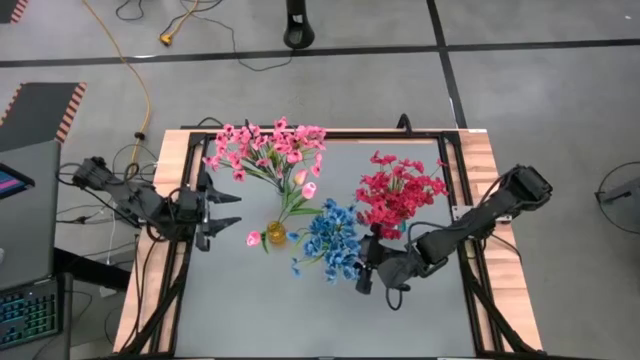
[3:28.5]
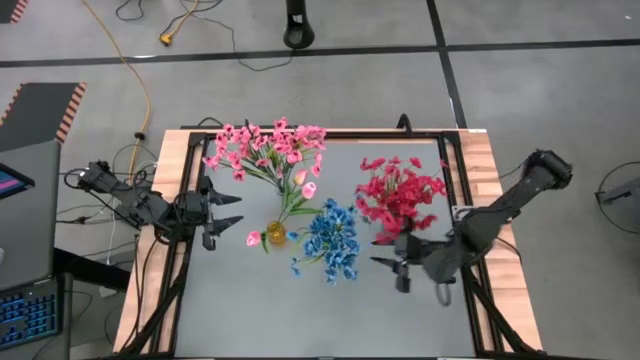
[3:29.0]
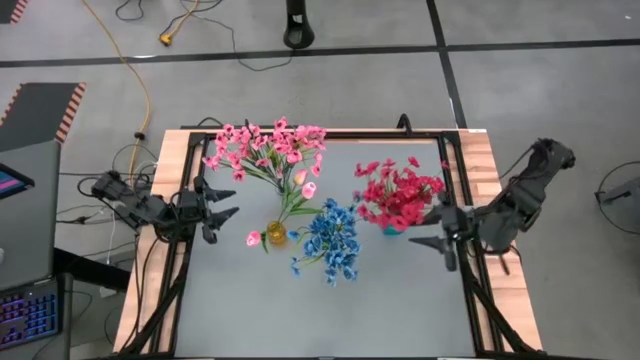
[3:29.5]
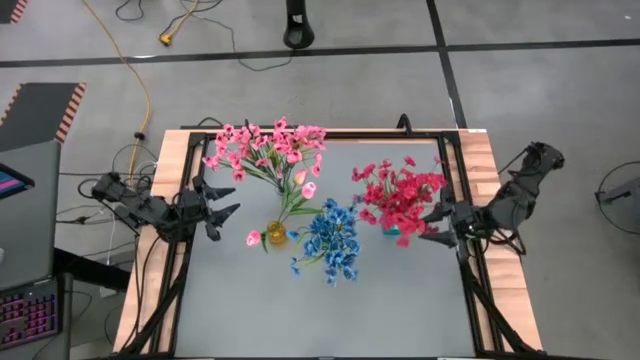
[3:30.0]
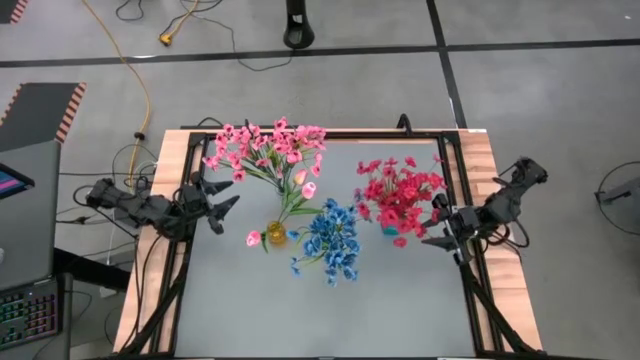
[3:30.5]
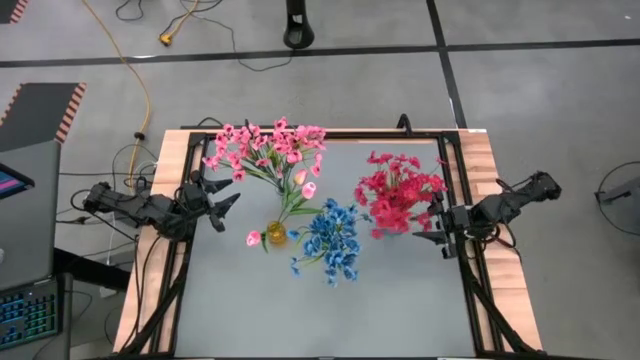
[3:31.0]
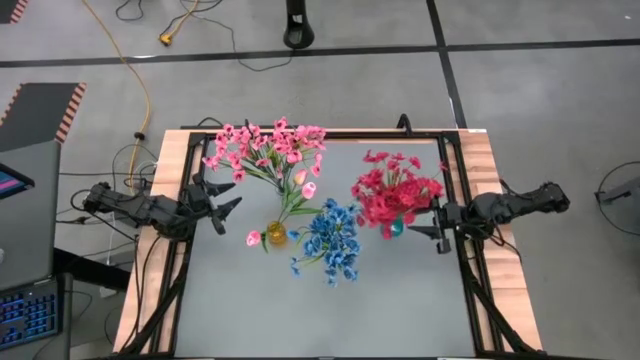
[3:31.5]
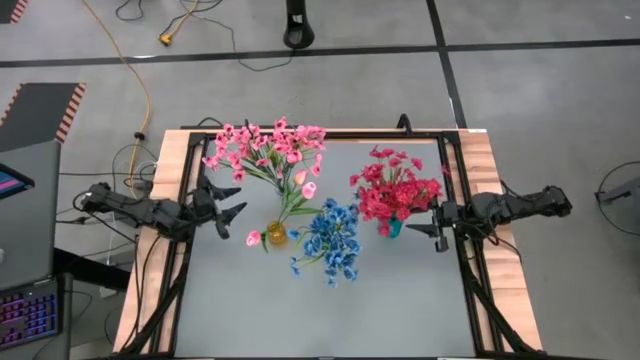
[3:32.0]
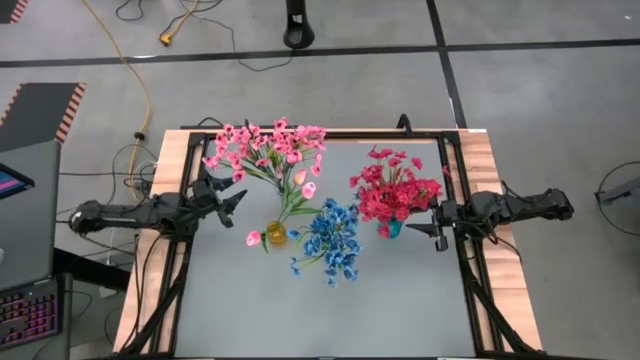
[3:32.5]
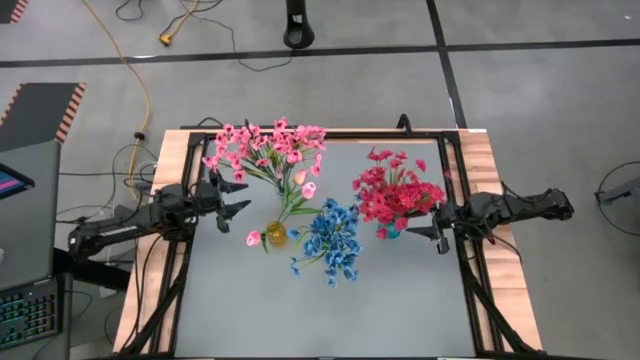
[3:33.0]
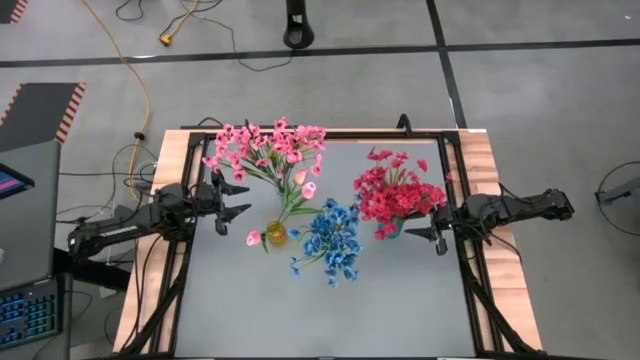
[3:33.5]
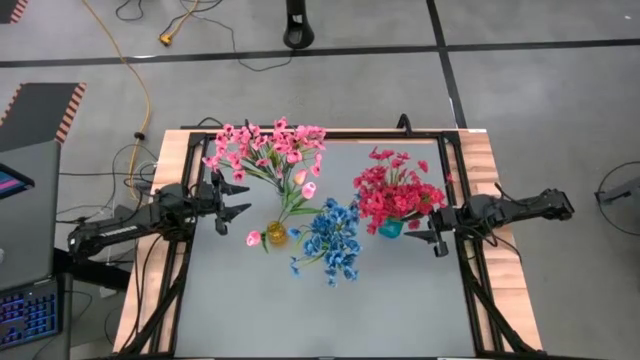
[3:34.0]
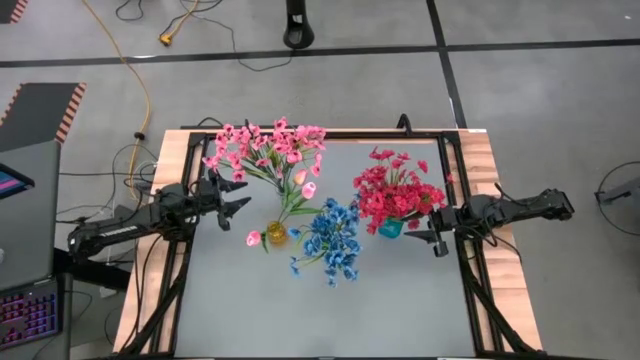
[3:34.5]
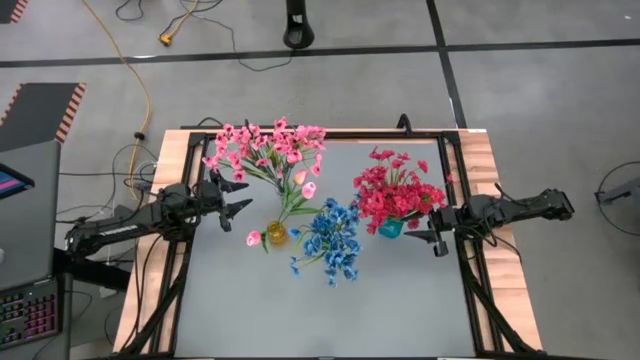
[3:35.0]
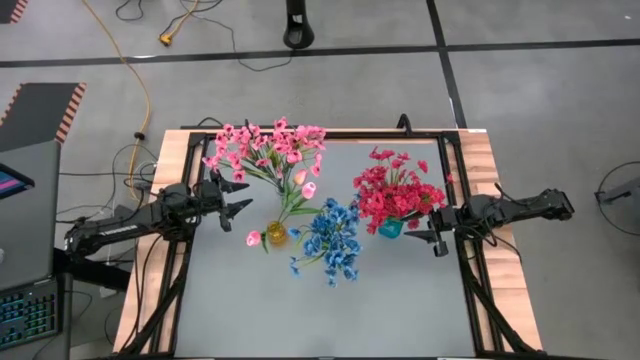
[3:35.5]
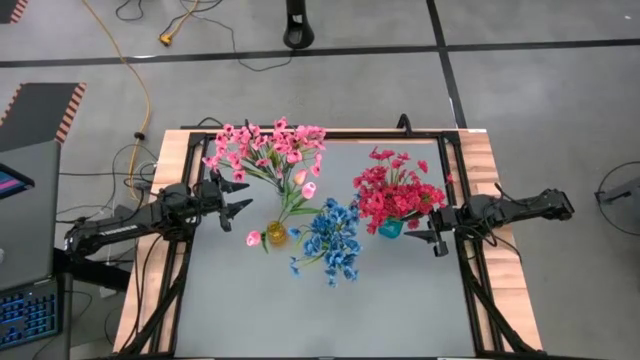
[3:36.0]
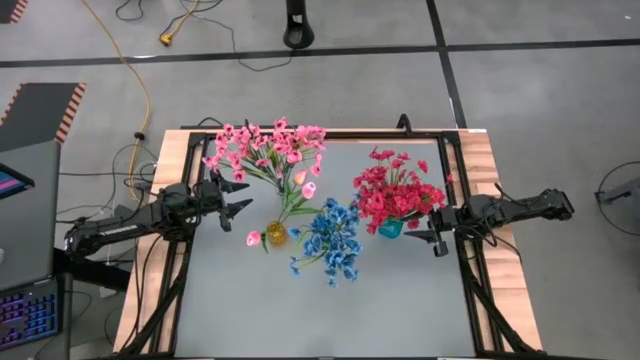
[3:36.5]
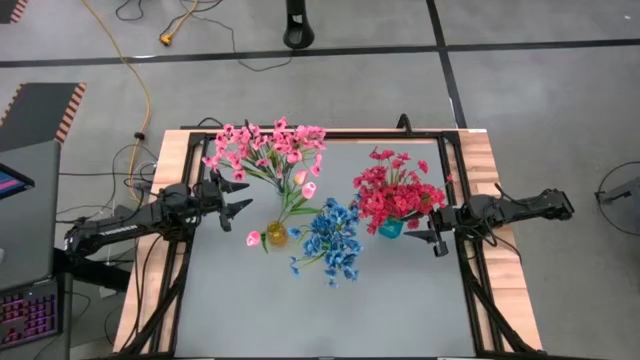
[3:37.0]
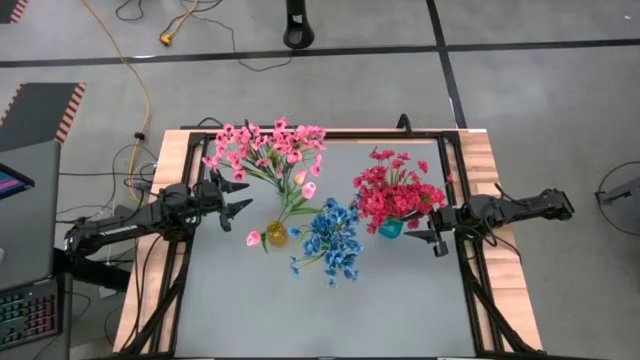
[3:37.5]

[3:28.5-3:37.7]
Task: Sort flowers into vase by color
Return to Home Position

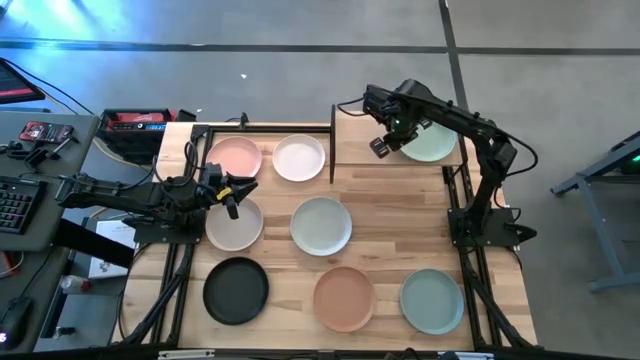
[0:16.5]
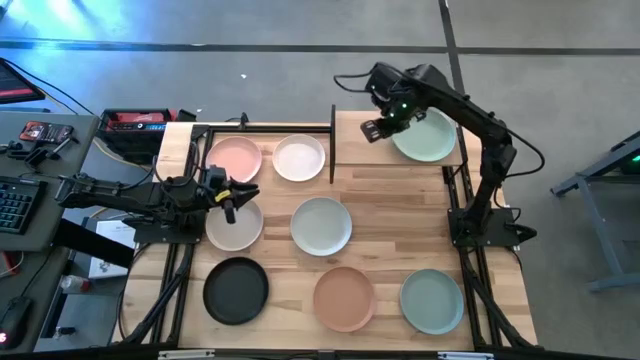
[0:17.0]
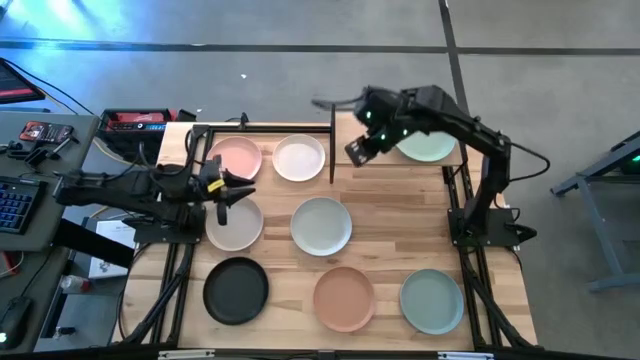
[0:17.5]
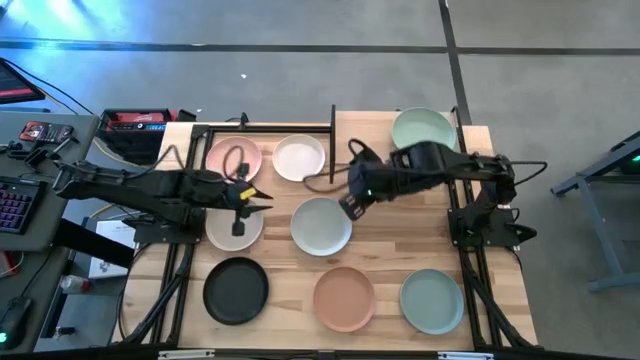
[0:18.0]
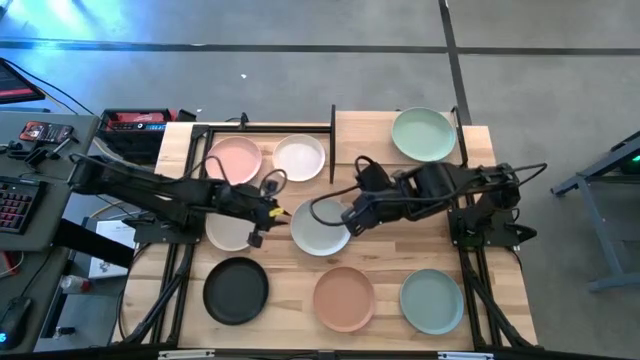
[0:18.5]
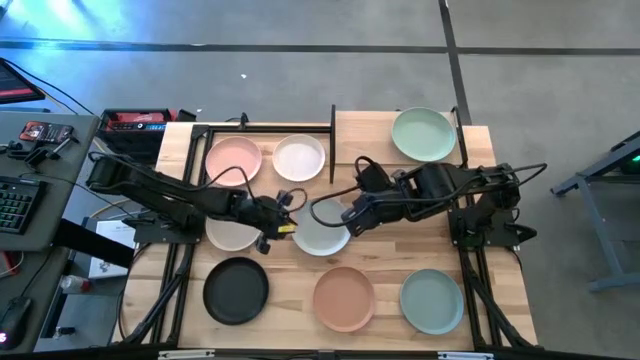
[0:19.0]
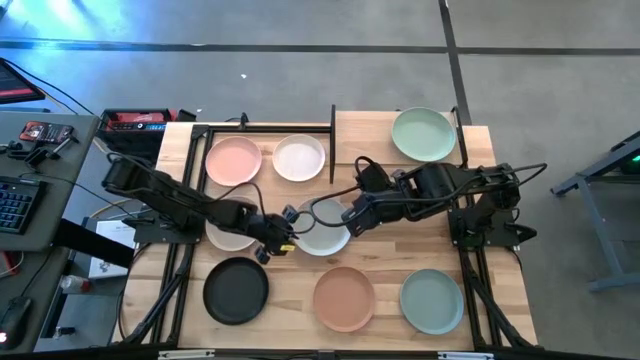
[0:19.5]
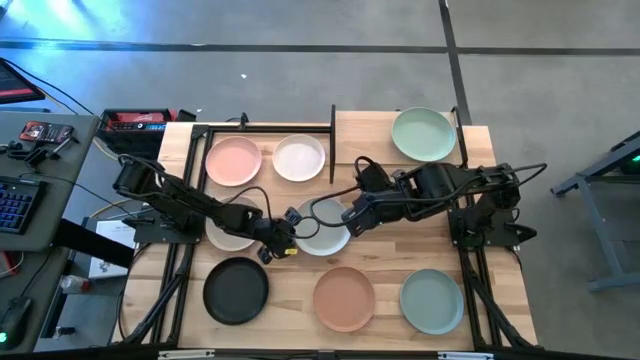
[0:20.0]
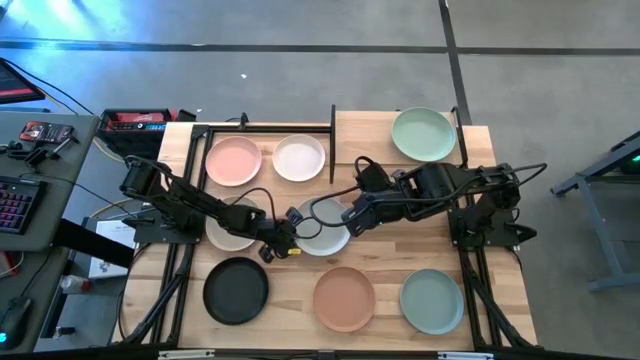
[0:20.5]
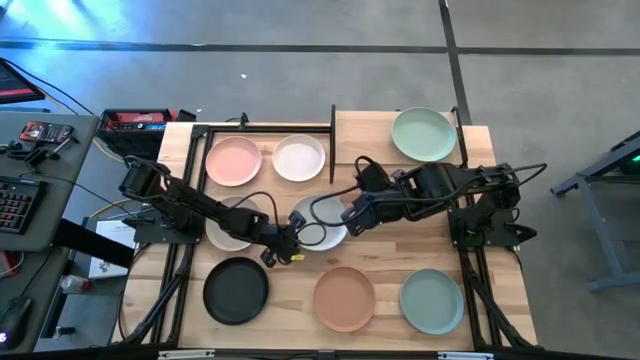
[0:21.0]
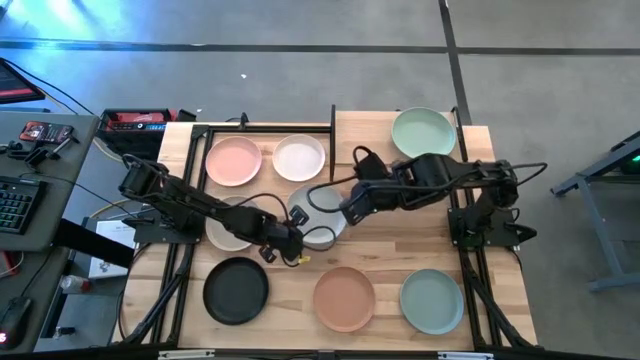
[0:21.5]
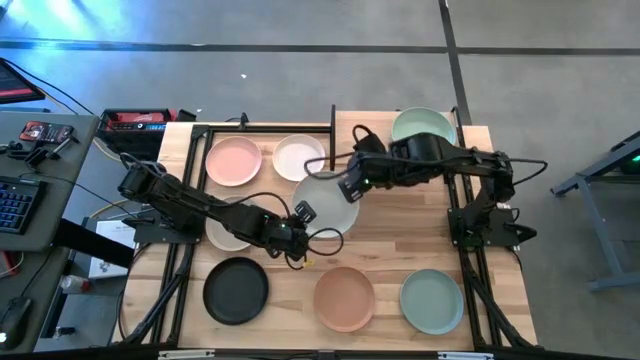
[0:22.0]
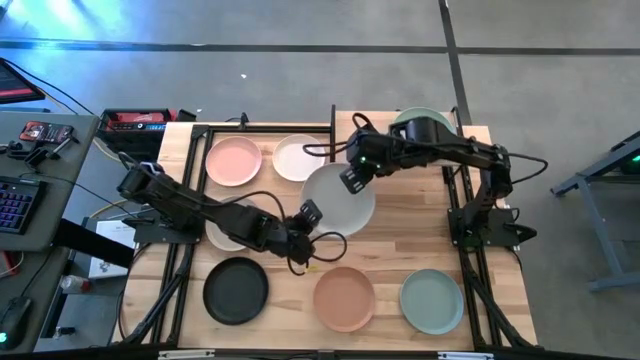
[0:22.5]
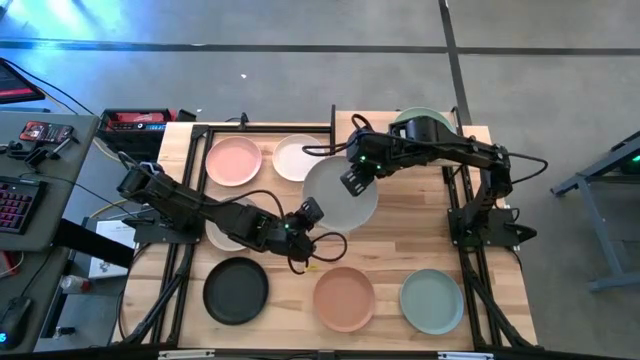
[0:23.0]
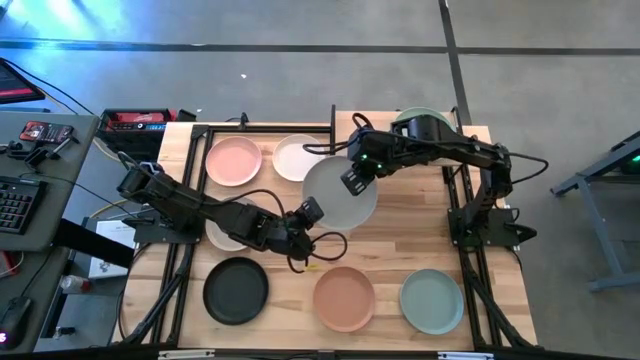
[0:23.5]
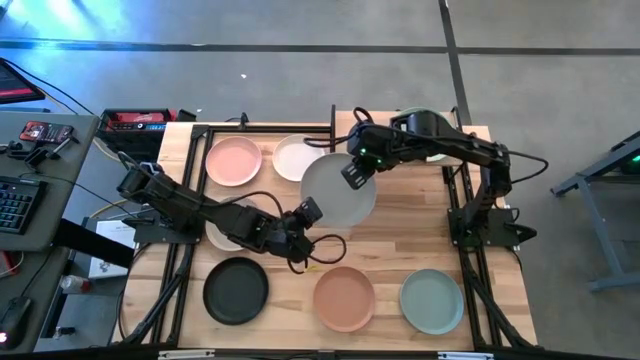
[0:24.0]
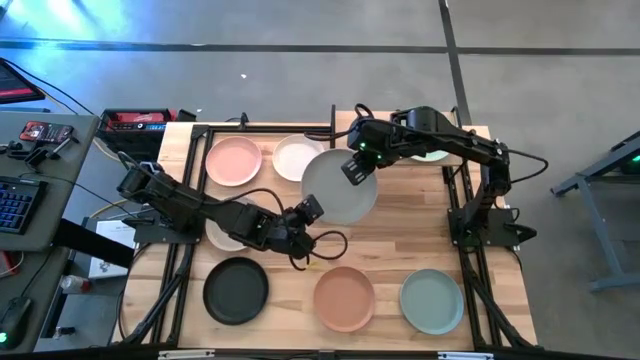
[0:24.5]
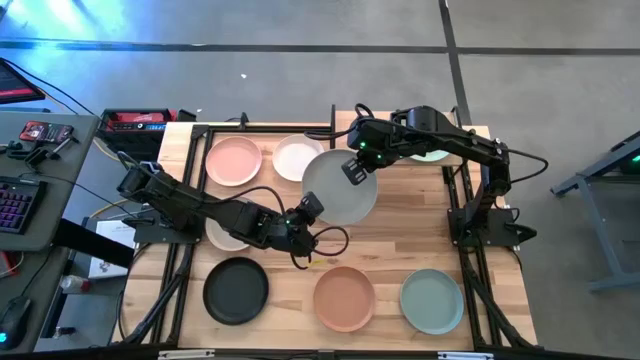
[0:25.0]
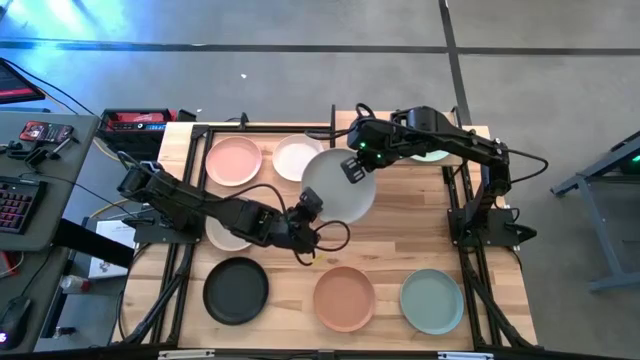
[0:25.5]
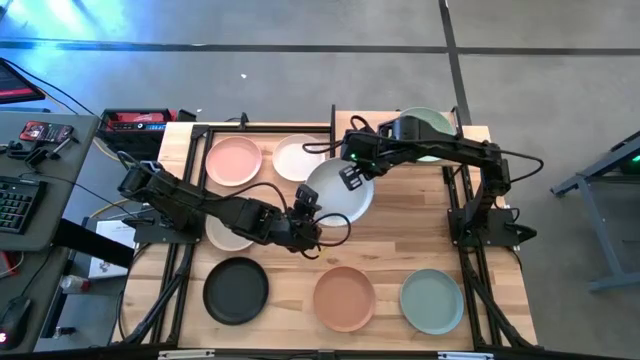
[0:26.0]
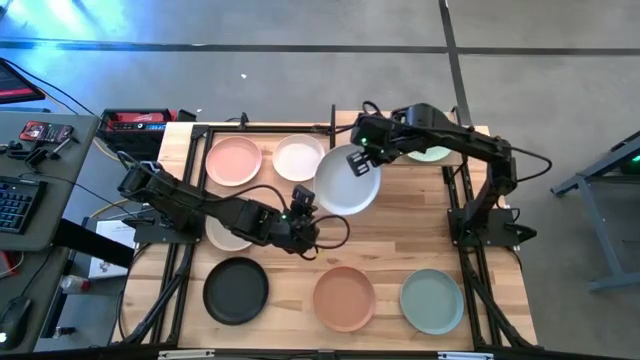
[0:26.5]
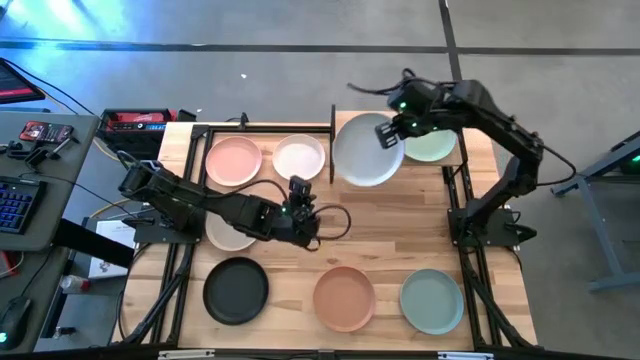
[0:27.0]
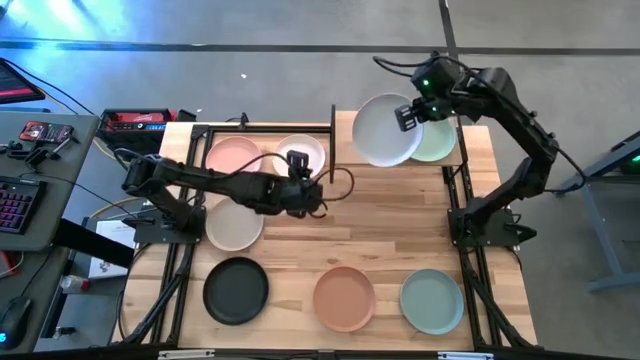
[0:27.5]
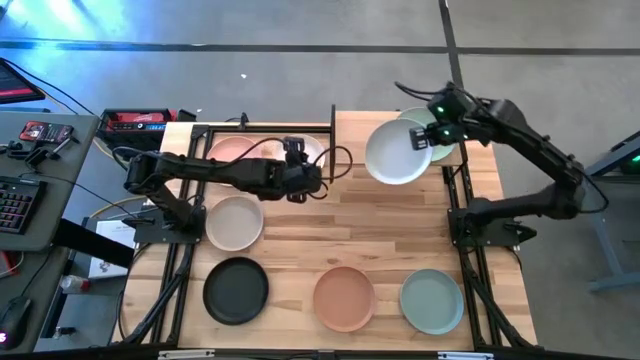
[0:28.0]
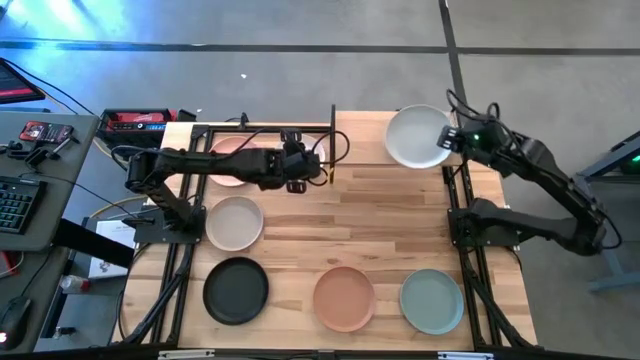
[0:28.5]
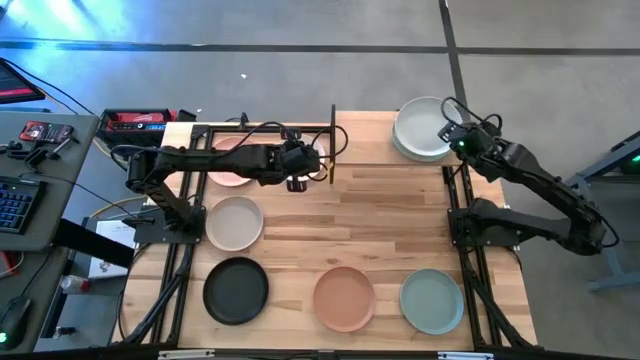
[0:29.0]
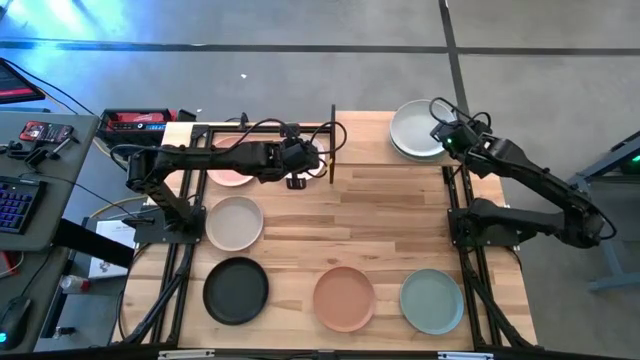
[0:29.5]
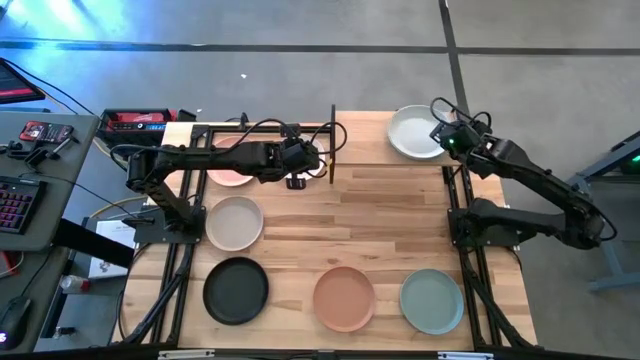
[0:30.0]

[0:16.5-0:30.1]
Task: Place and stack plates onto a shelf
Stack the light gray plate on top of the green plate on the shelf
